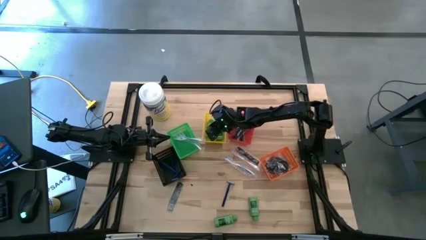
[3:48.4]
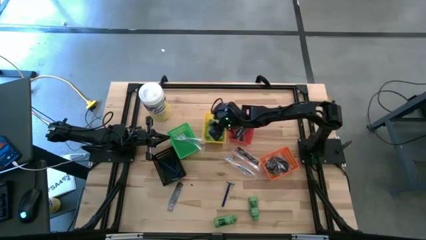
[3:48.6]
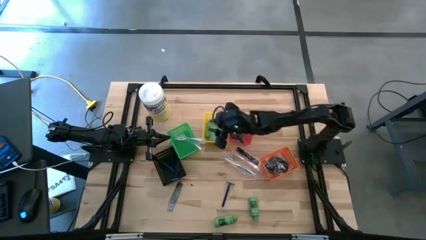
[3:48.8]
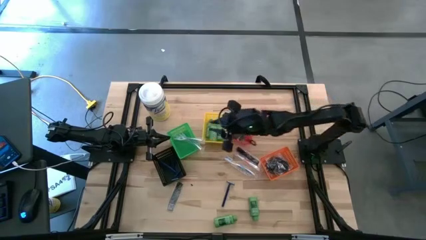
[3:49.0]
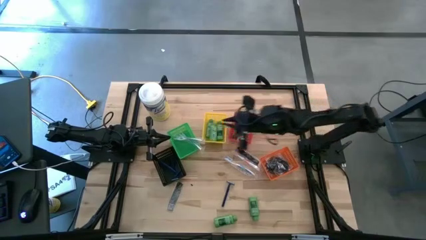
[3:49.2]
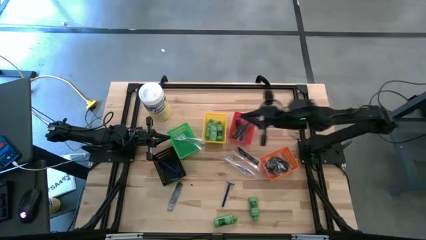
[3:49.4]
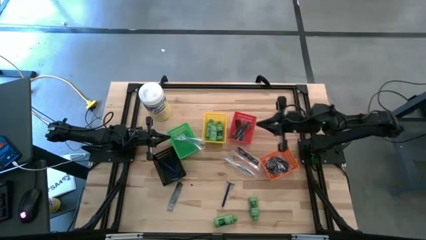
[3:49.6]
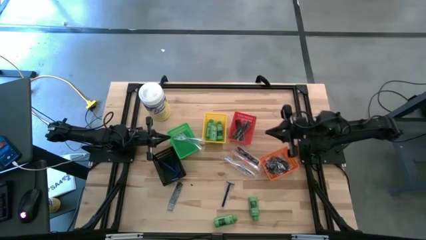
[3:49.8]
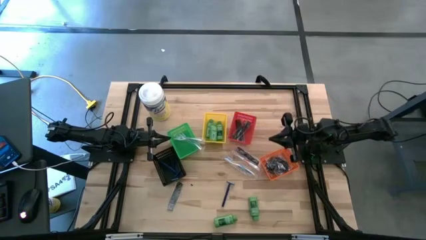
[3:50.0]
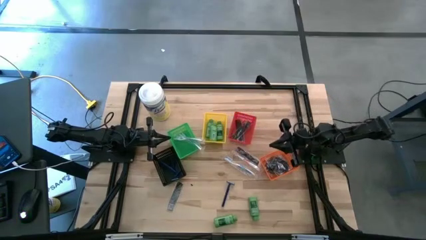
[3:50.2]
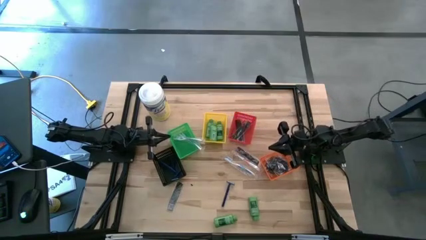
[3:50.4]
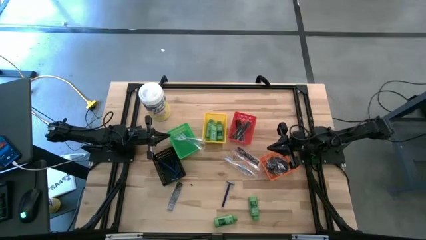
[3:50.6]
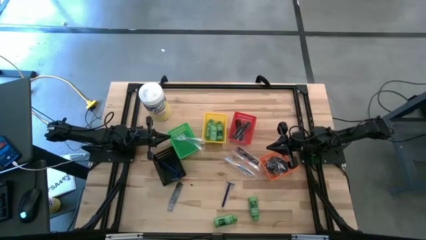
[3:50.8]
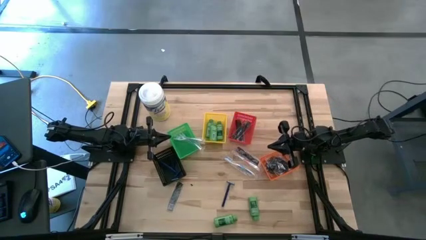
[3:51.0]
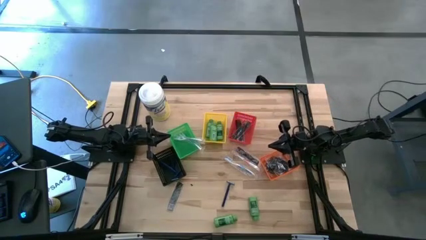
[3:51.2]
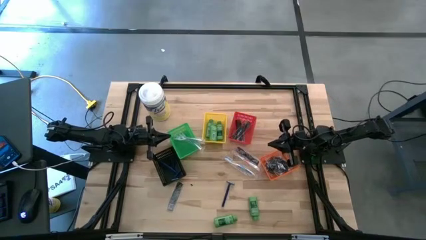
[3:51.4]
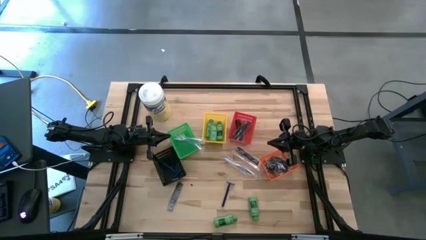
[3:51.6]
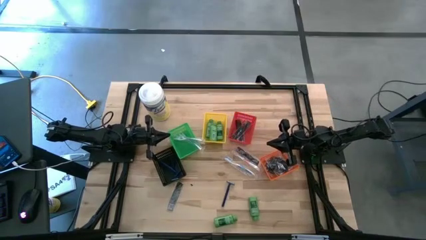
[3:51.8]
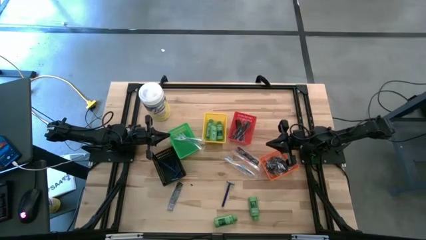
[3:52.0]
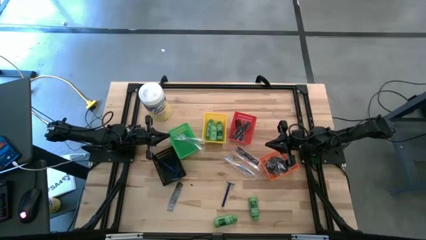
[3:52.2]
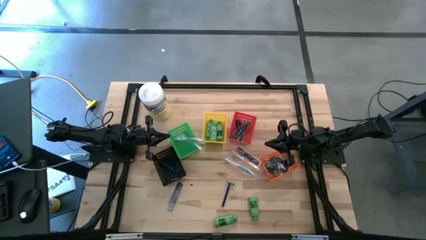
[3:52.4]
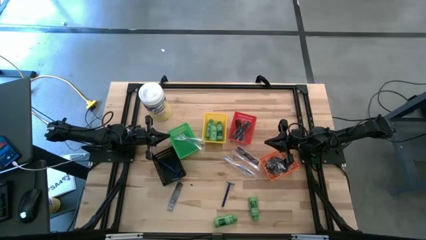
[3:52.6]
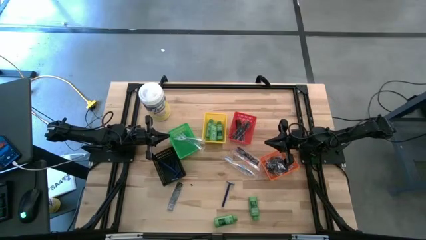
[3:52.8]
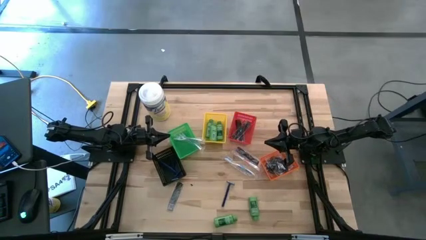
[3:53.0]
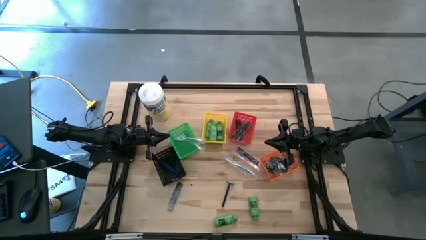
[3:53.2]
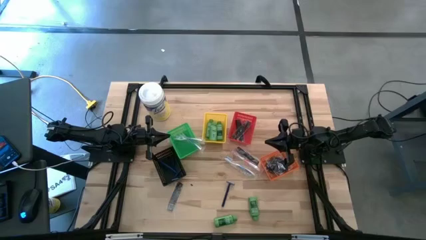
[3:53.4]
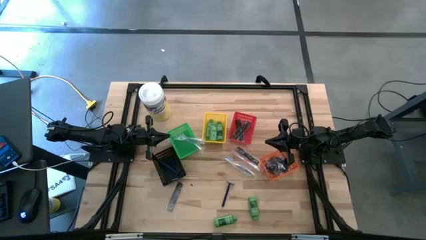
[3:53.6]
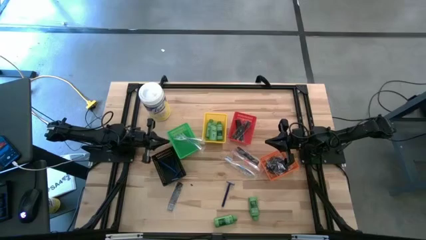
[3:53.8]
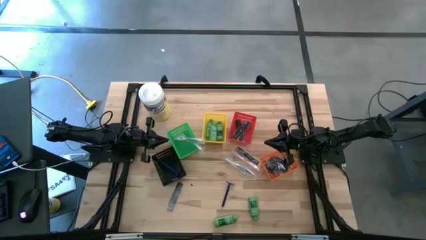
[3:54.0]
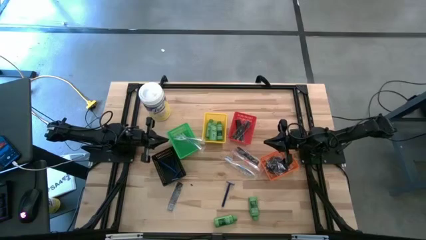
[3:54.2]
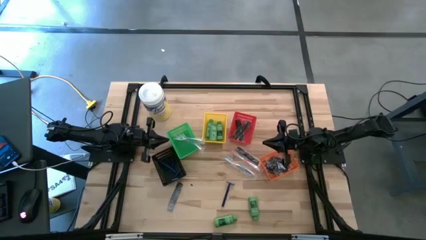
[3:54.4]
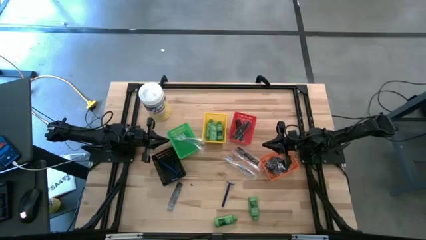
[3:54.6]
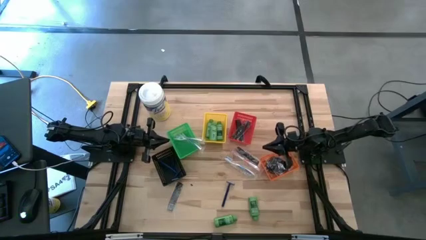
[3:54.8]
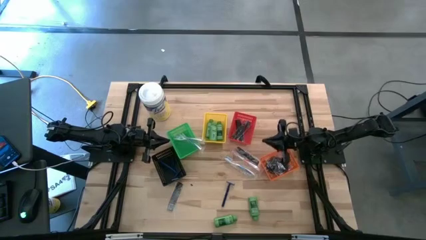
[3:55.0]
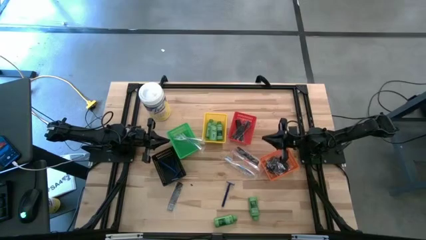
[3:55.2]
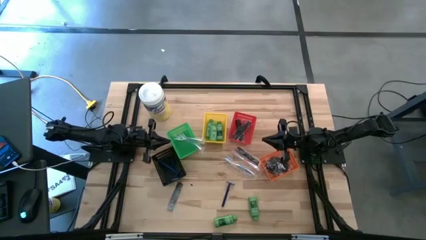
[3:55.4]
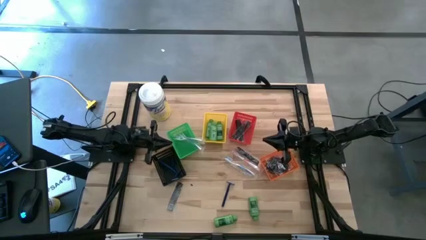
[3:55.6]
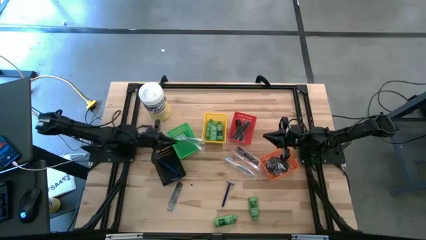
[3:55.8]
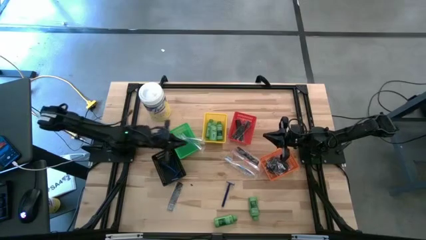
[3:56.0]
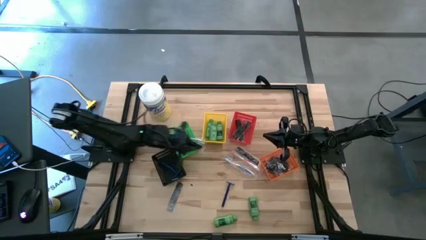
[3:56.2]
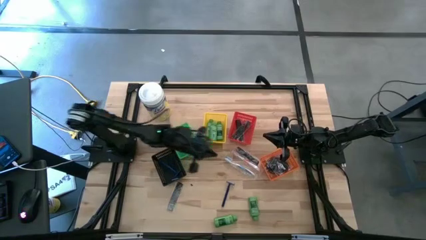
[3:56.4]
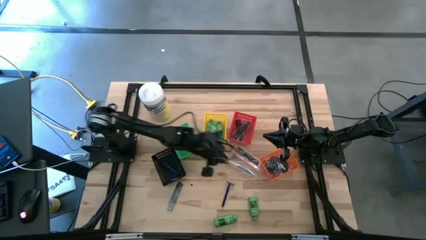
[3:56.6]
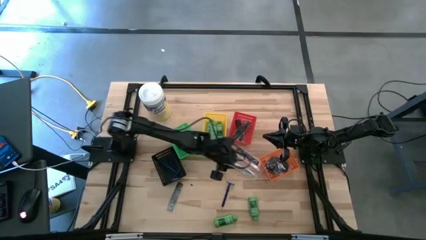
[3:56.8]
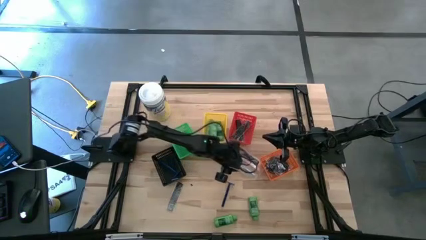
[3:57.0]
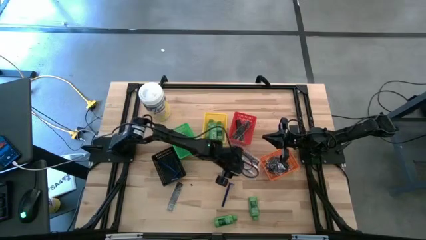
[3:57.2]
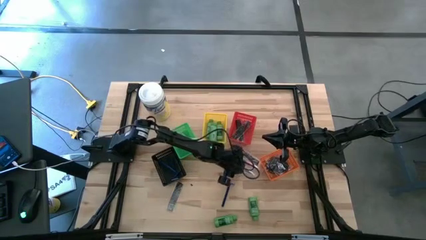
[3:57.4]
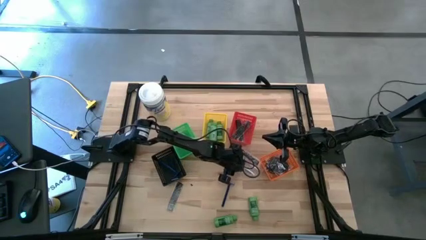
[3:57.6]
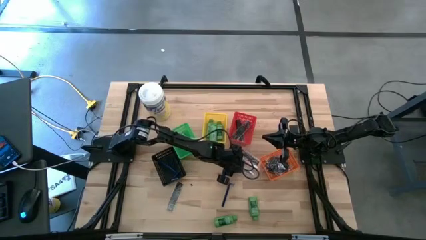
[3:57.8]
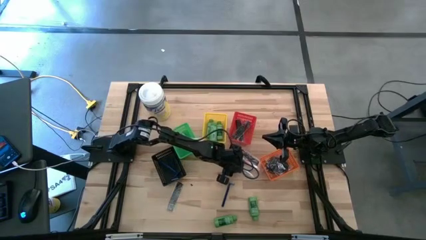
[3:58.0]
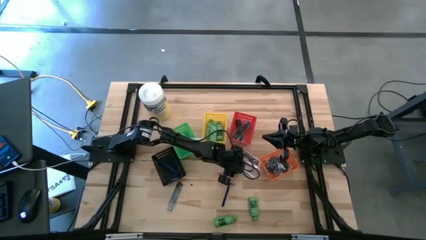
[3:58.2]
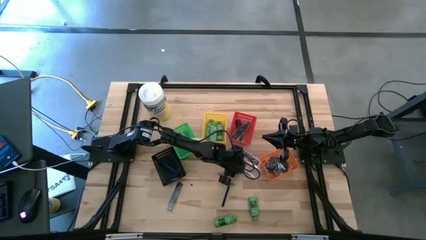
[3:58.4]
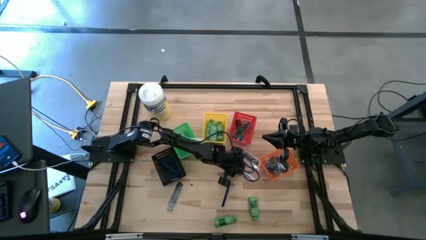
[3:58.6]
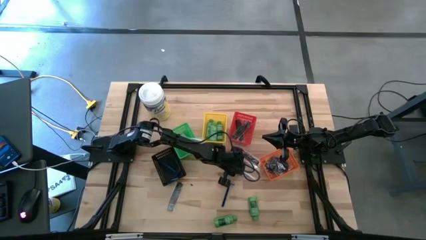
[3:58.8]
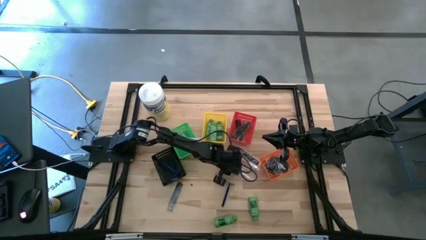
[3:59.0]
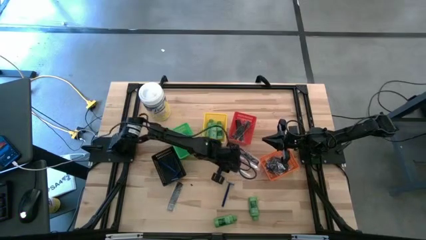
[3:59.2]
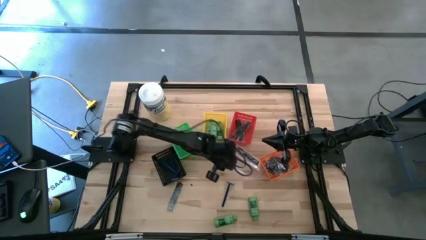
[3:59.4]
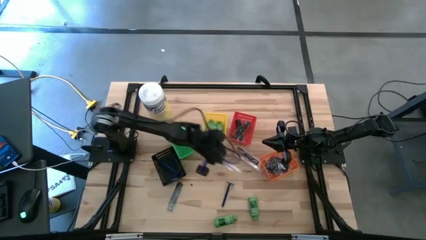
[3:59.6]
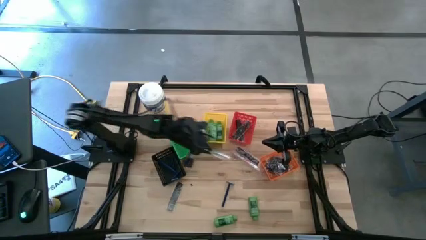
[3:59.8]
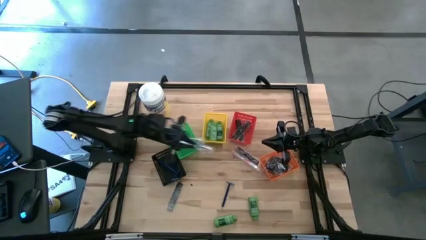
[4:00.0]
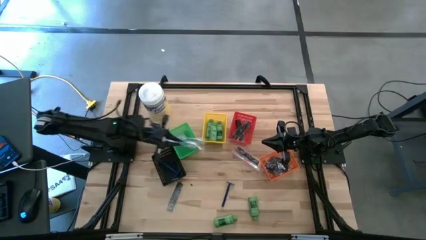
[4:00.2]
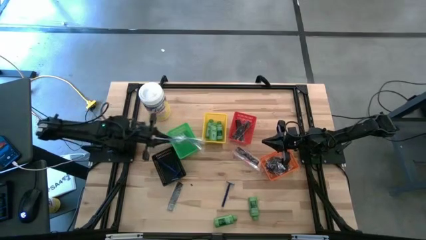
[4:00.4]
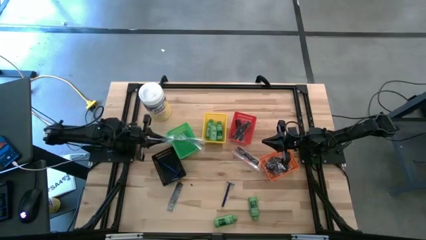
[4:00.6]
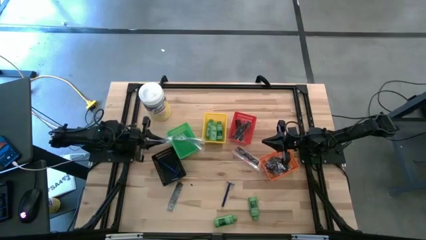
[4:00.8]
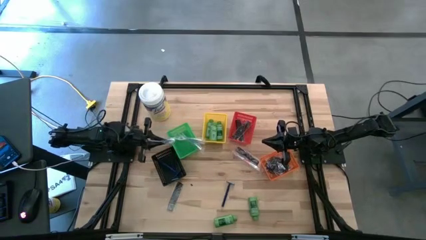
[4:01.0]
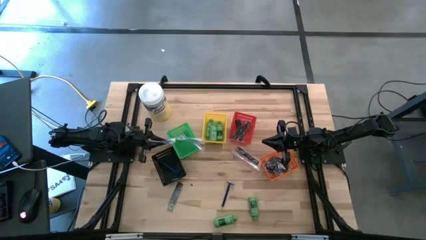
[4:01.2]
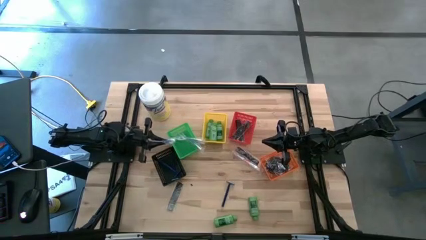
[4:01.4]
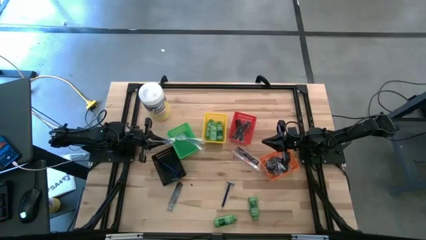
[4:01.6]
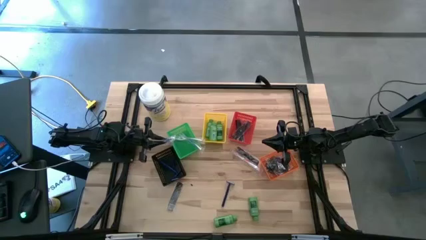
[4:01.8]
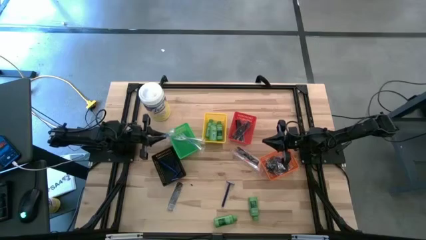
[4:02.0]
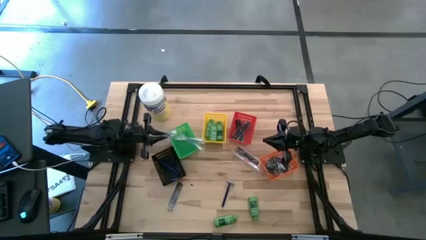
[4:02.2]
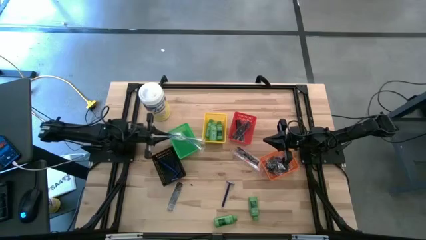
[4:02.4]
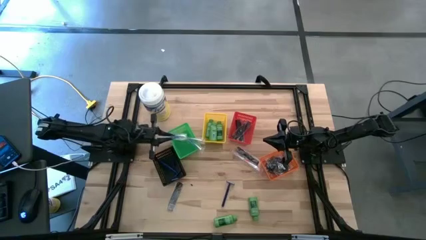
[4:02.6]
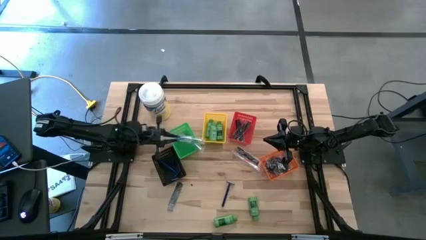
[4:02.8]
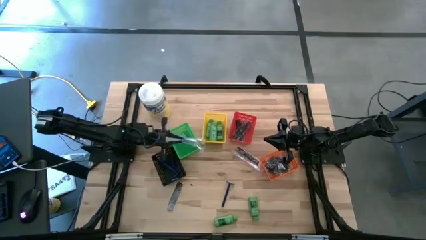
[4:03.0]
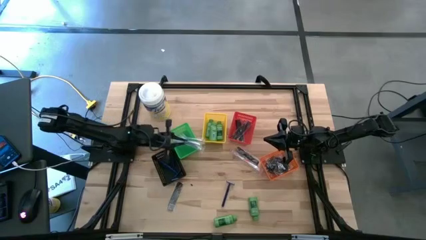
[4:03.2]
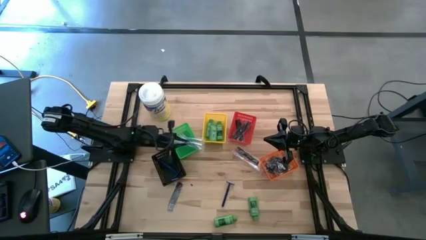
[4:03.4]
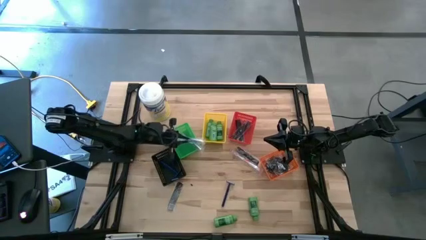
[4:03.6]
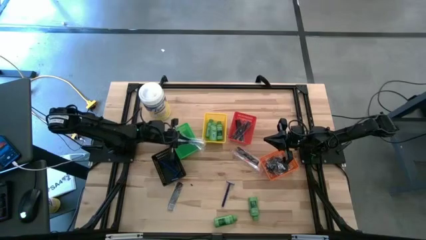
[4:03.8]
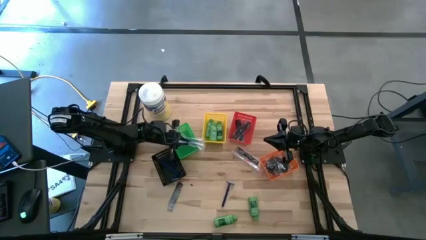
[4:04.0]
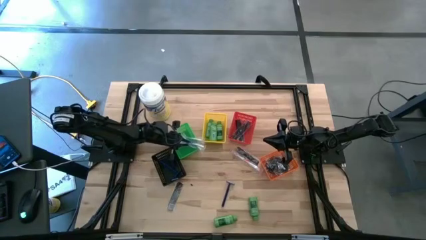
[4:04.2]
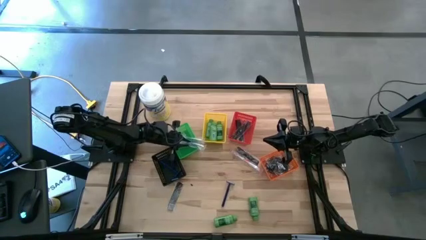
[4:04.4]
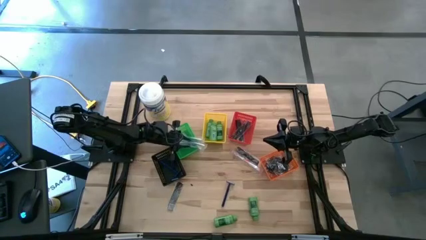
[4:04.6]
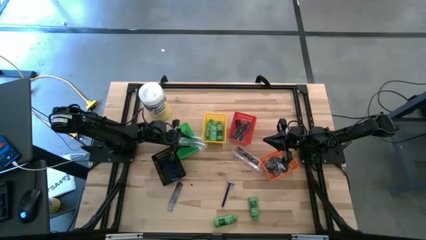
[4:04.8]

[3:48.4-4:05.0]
Task: Pick & Place Travel size toiletries
Put the blue toothbrush into the green bin
